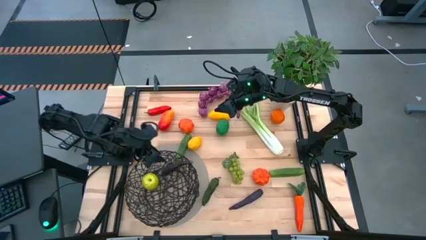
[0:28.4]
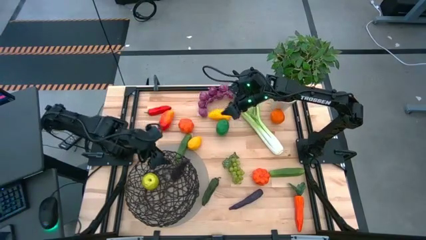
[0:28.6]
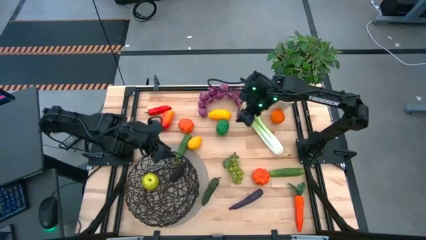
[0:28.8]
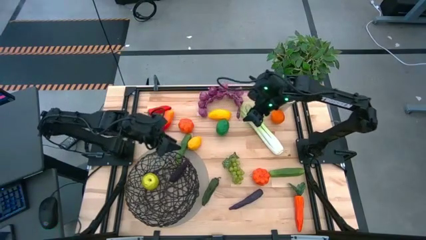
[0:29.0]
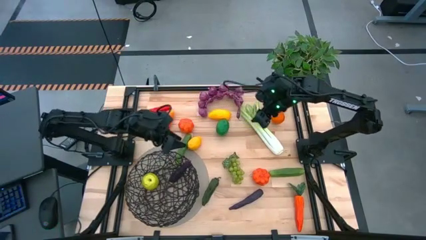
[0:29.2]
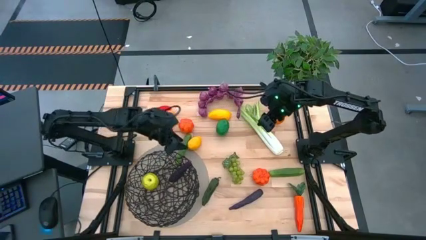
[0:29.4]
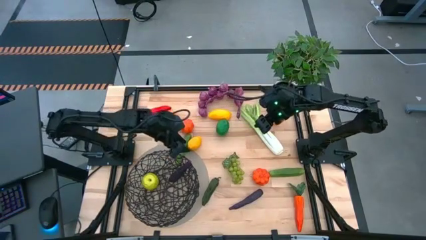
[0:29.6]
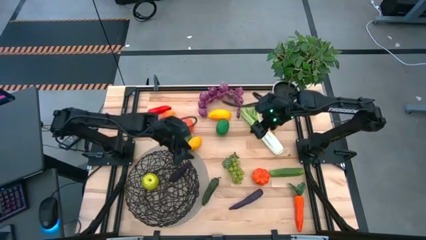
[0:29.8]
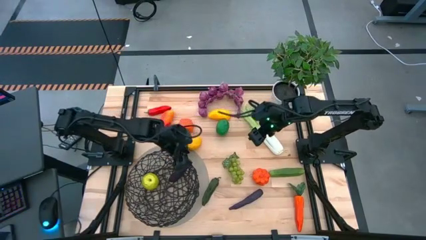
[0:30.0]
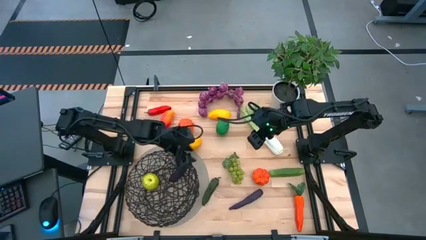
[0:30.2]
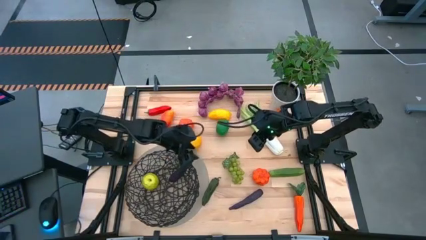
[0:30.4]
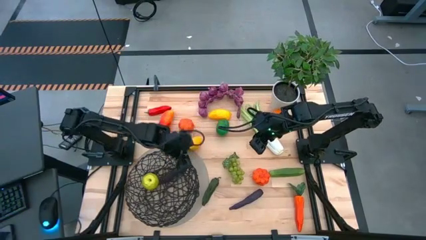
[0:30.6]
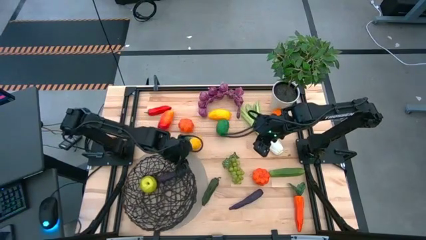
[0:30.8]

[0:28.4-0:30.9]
Task: Build produce basket
Adjust the black basket

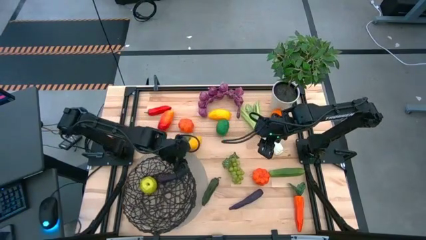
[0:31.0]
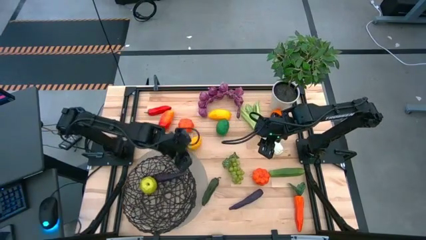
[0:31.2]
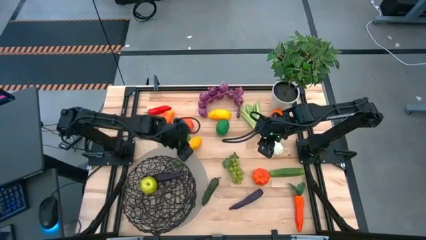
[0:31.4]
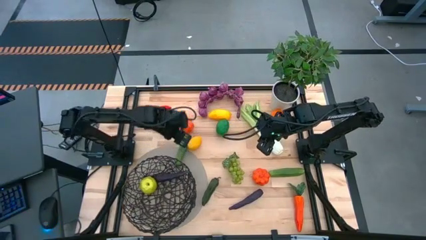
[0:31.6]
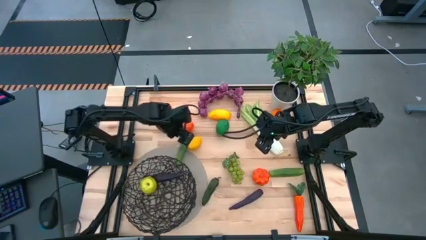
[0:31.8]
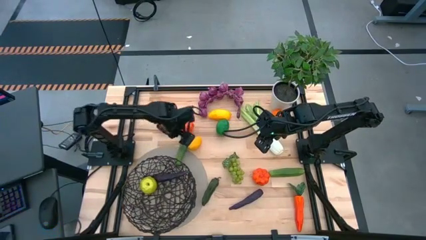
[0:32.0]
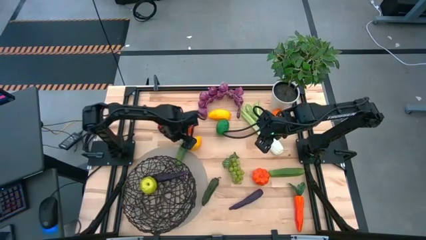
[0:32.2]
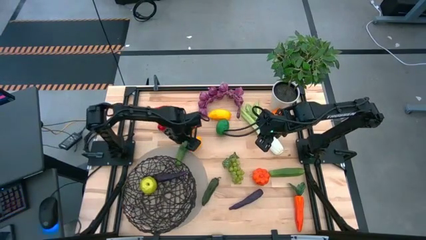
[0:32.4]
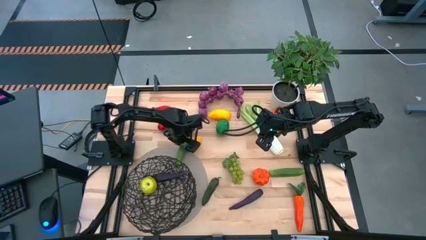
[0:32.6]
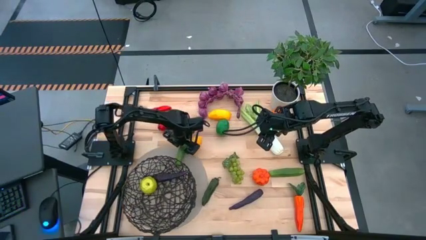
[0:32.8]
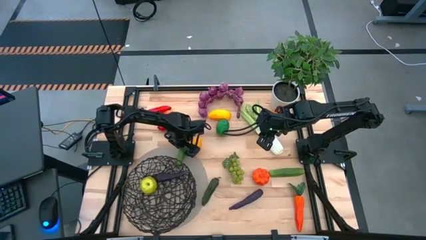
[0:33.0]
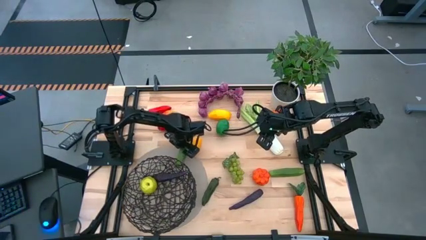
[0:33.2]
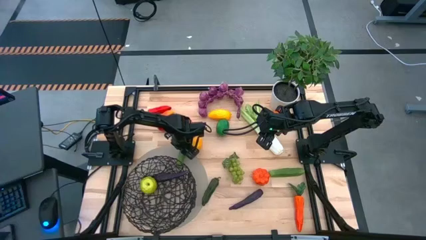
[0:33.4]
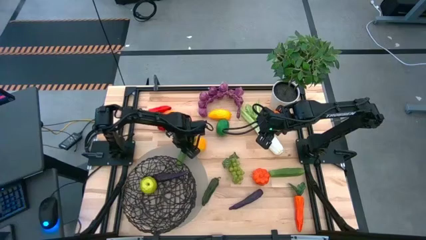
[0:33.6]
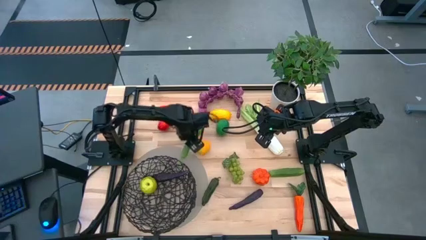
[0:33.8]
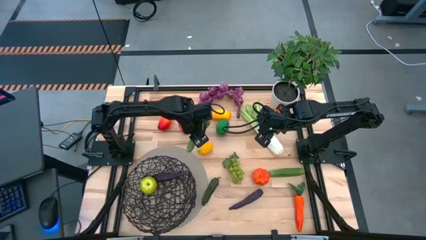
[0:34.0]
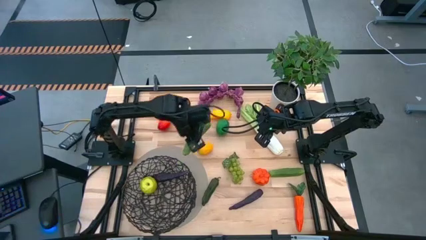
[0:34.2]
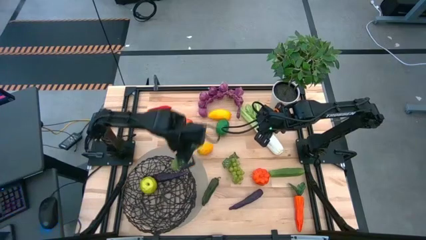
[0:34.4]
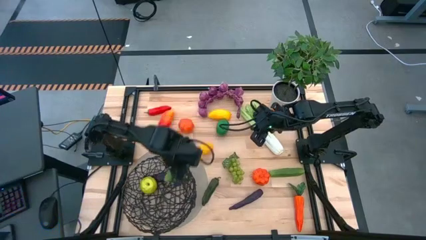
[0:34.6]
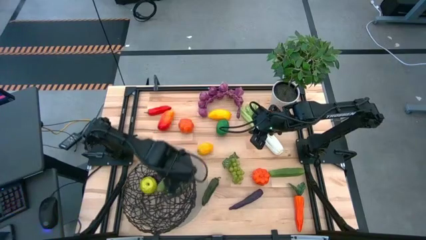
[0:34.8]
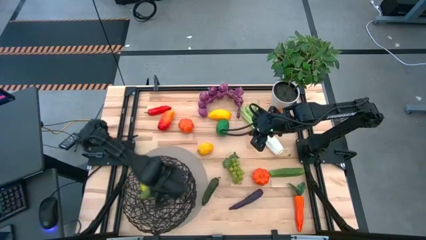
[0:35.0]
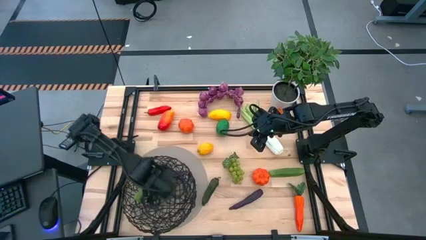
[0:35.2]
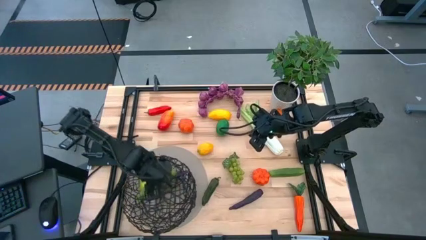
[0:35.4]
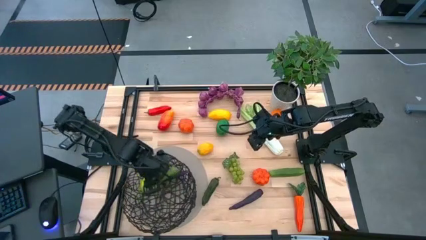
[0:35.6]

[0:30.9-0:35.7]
Put the left cucumber into the black basket

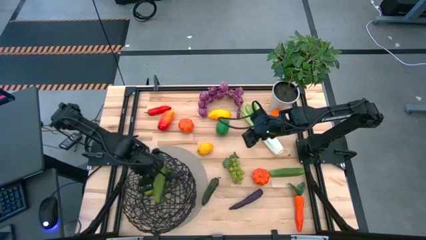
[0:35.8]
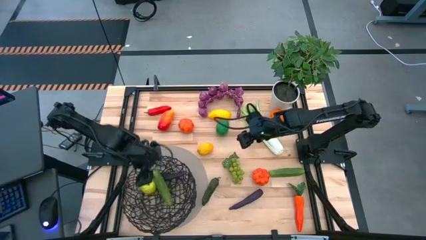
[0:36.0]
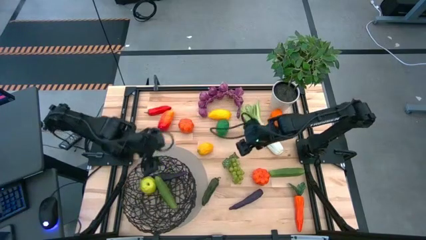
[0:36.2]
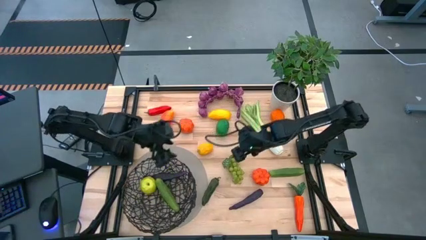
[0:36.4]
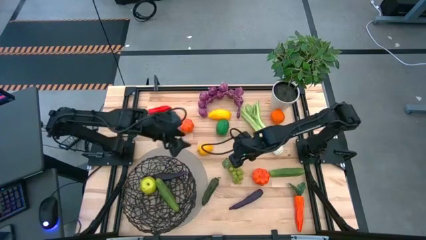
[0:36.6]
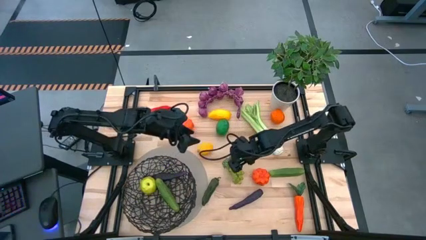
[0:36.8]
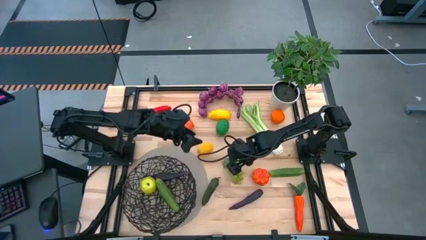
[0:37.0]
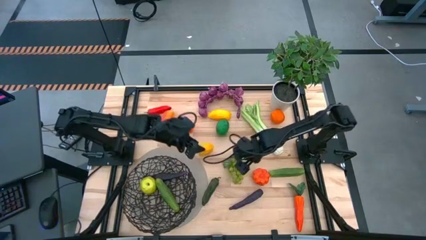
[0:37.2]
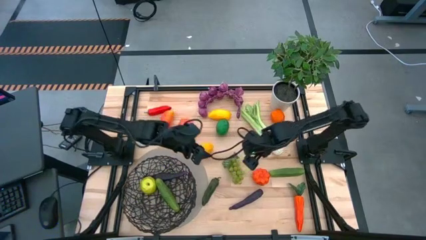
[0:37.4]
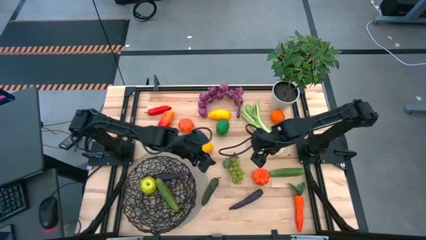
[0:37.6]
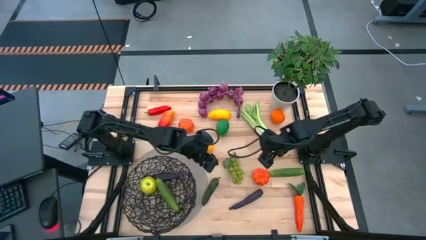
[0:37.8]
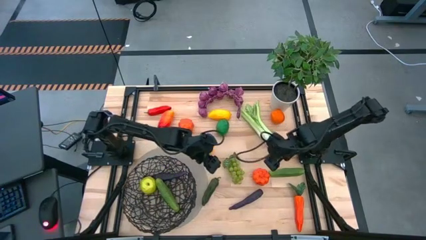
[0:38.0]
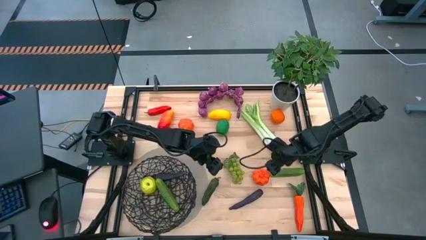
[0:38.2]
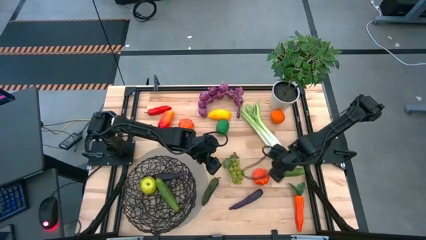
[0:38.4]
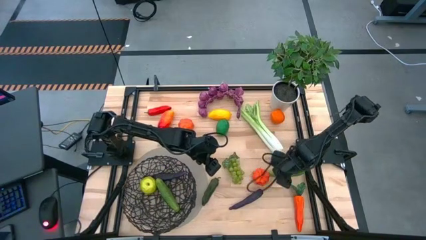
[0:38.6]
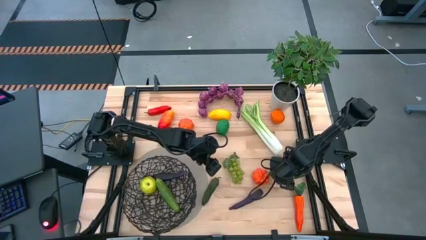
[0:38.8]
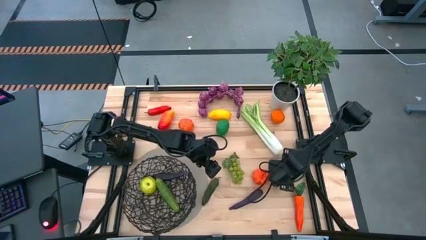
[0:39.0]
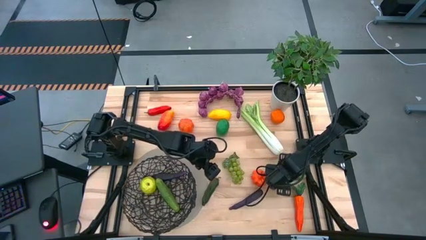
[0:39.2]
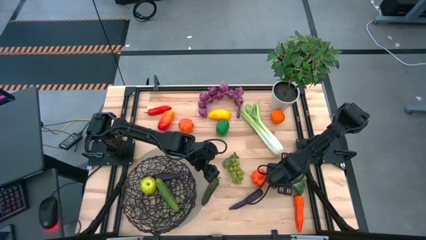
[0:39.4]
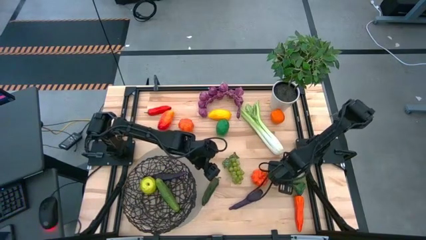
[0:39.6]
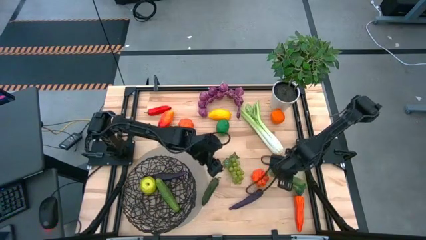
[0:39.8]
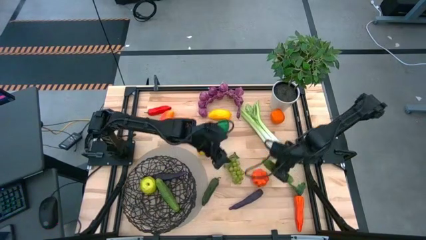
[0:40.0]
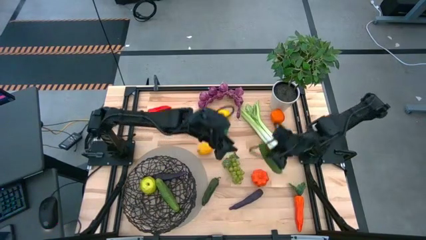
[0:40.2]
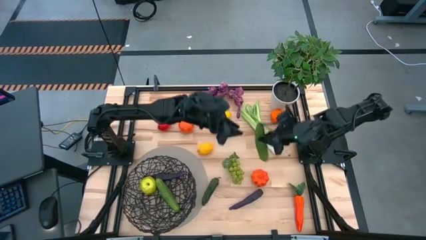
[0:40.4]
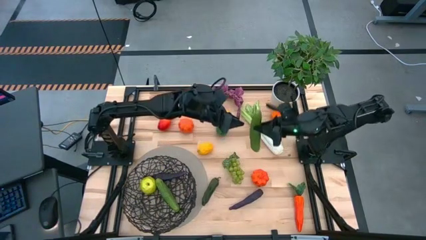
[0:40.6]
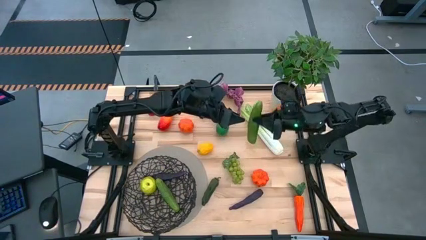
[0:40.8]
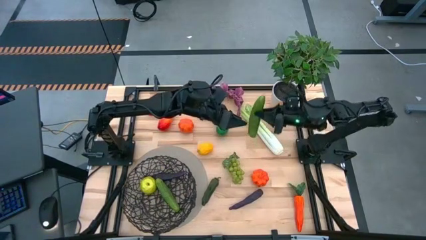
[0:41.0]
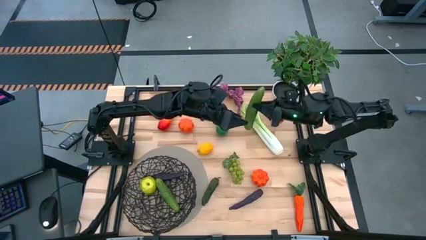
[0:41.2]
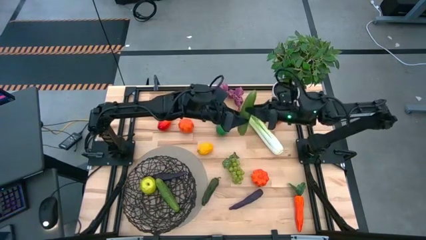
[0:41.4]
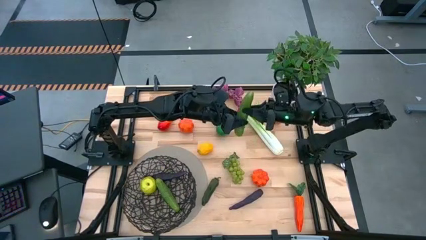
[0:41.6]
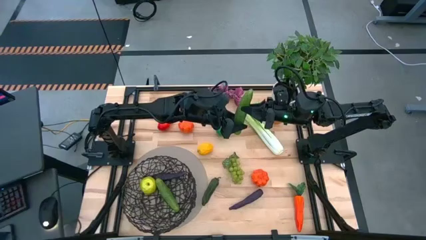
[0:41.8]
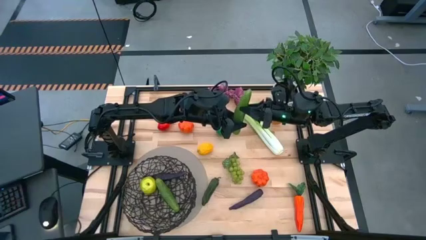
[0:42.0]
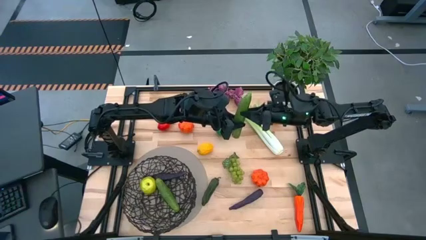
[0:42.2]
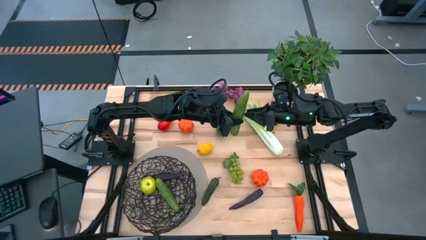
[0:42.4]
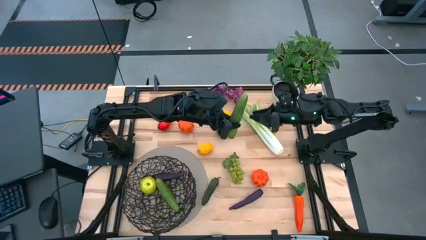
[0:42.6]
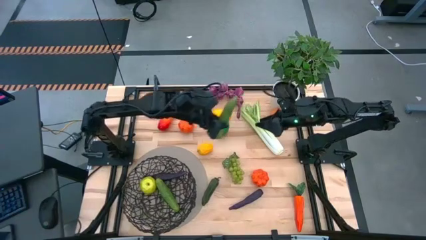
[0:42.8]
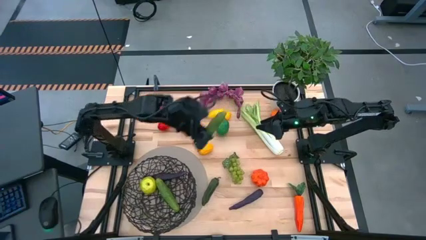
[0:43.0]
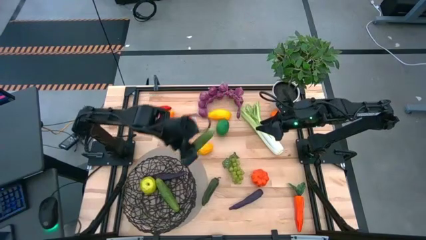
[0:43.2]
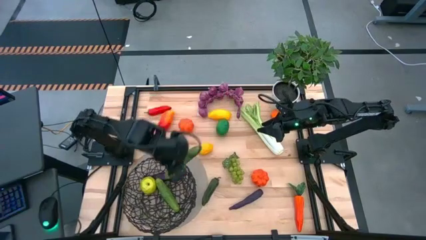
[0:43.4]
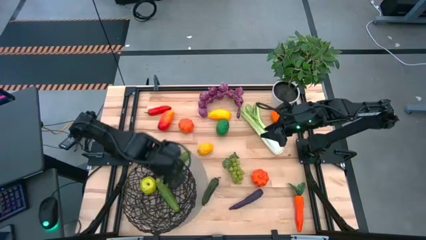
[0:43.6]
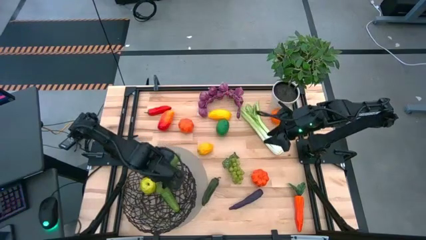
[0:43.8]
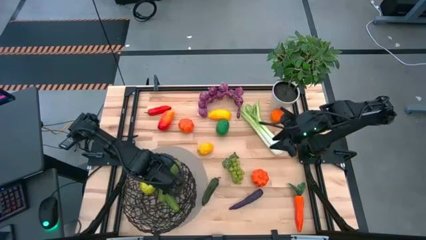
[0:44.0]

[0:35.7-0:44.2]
Put the cucumber into the black basket
